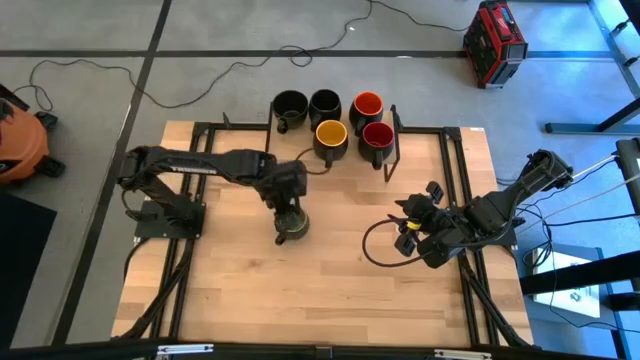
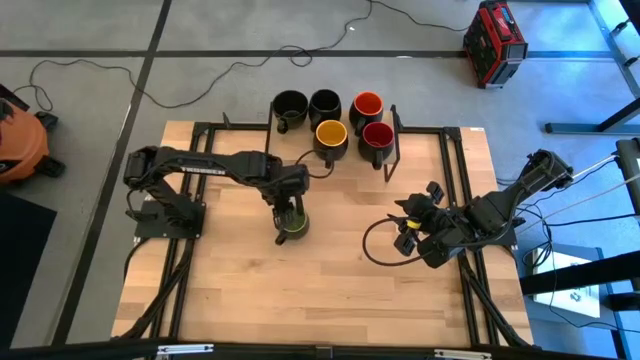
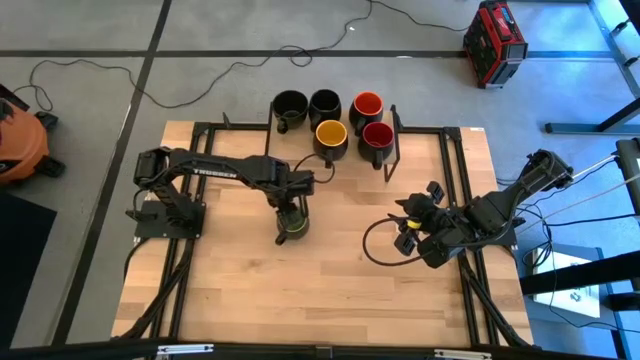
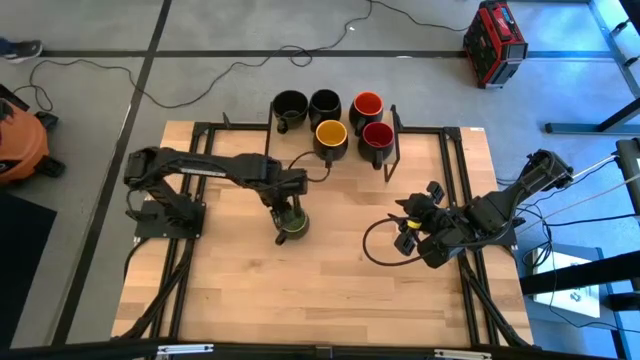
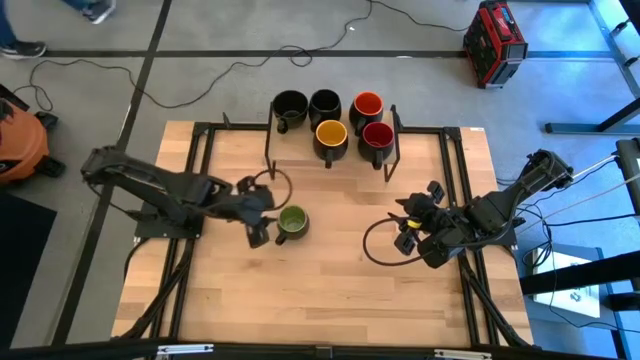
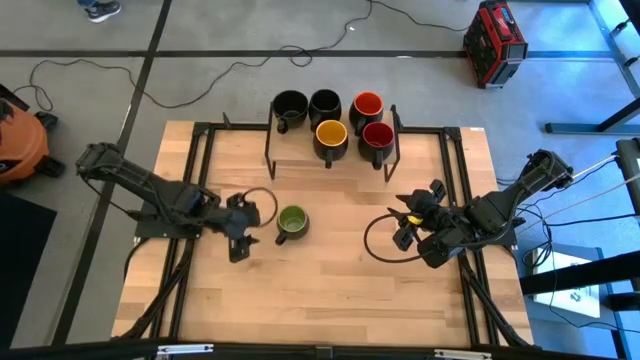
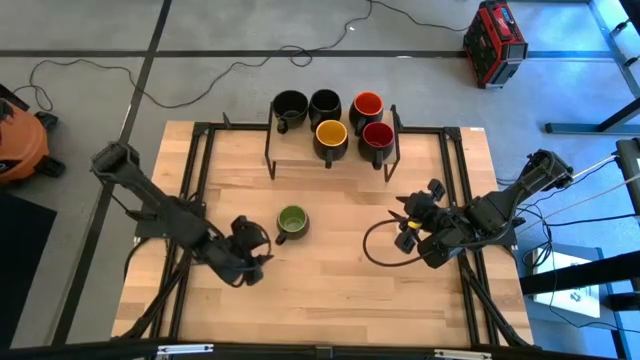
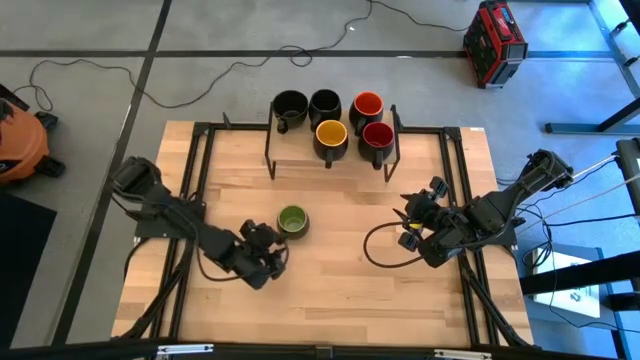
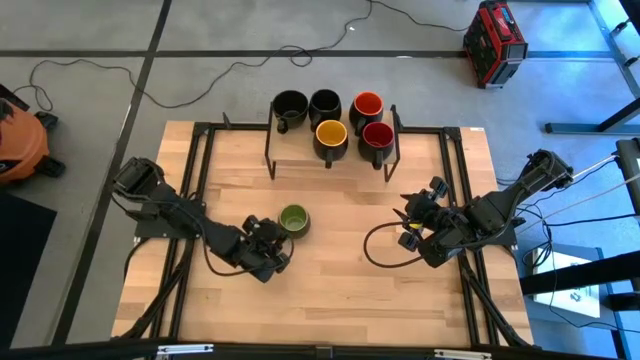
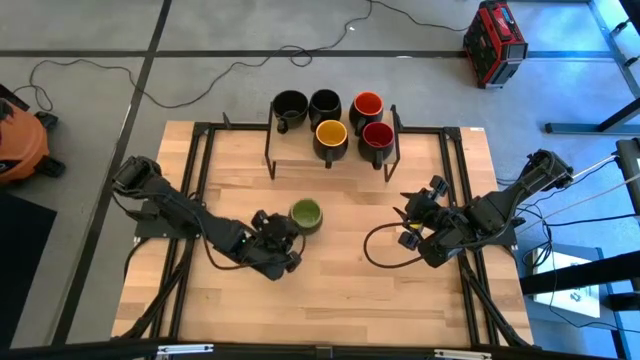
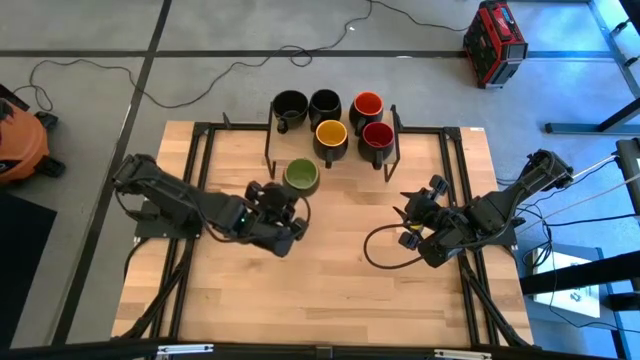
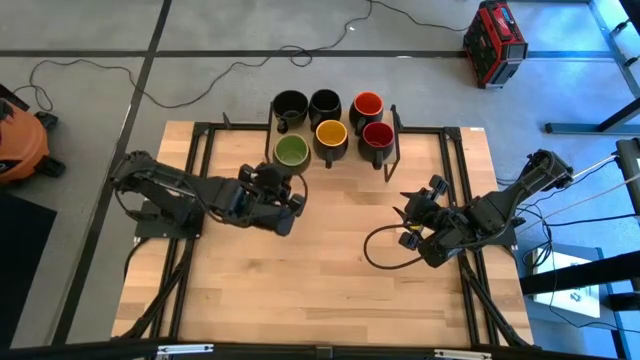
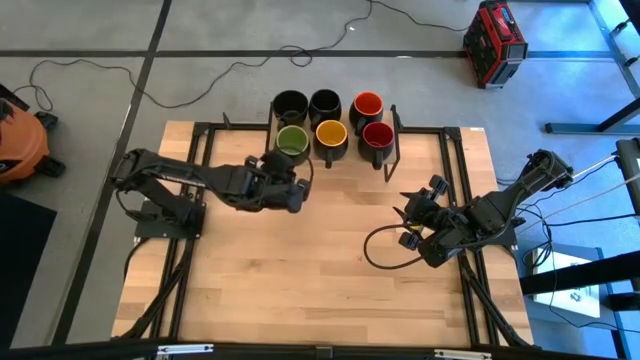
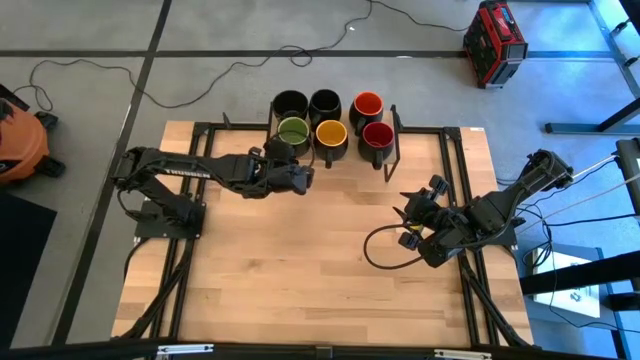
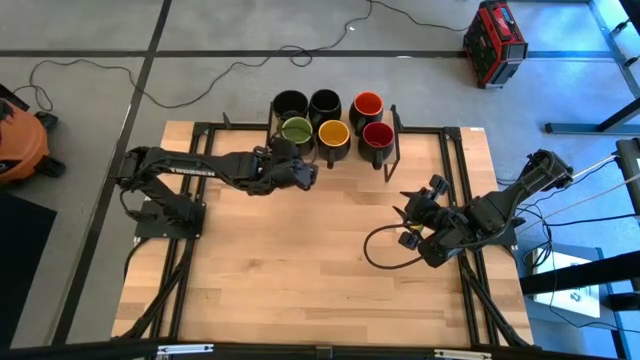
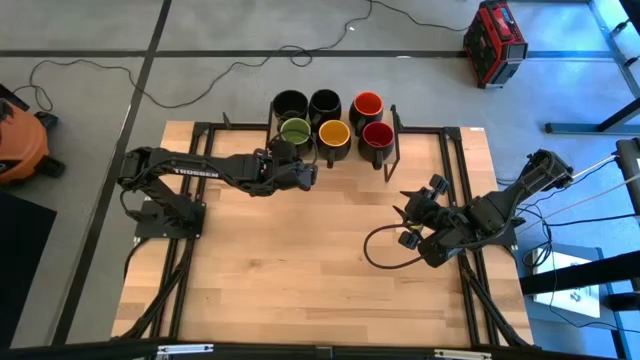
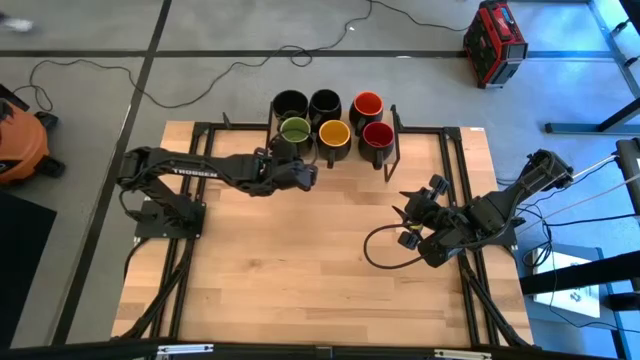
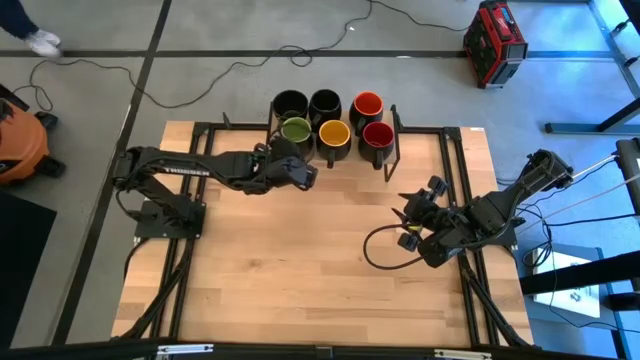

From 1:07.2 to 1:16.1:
Task: Place coffee mugs
Put the top green mug on the shelf

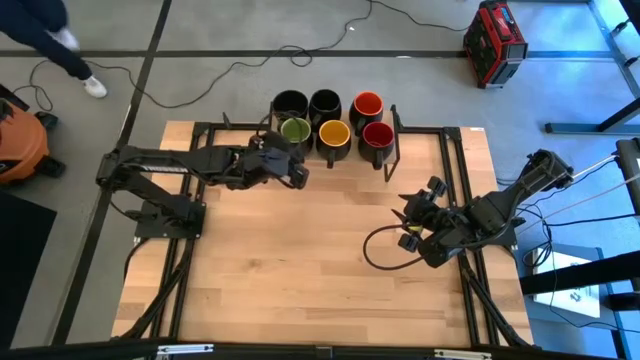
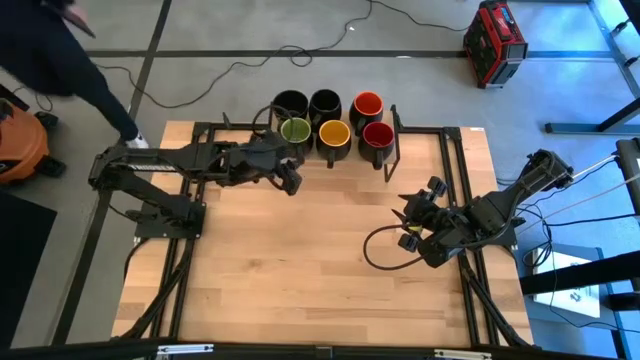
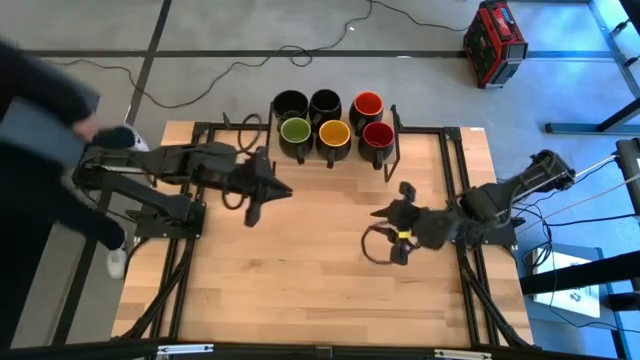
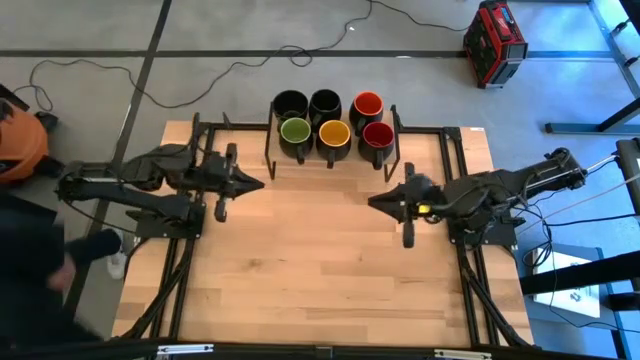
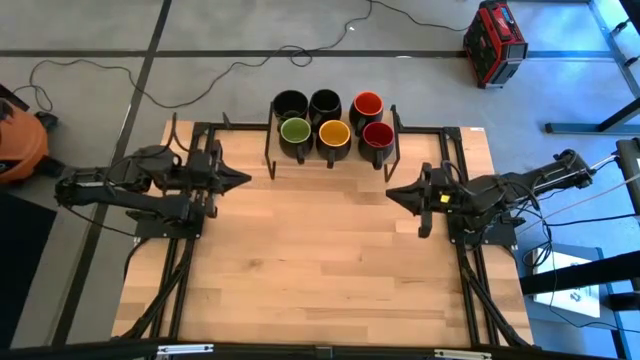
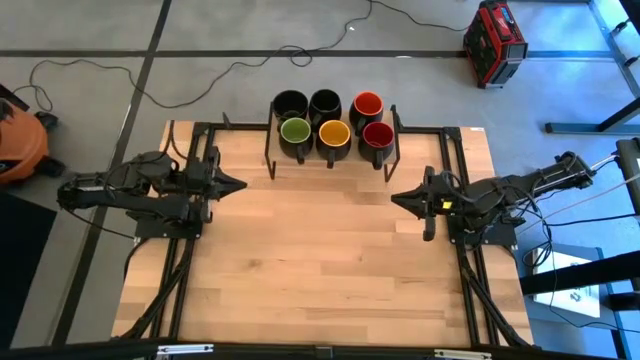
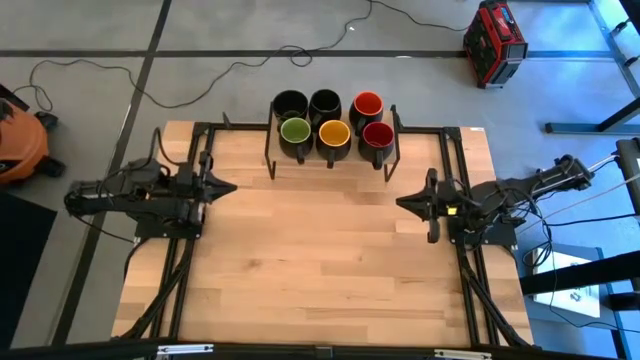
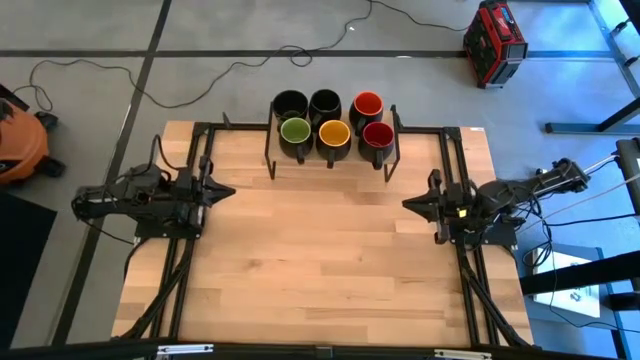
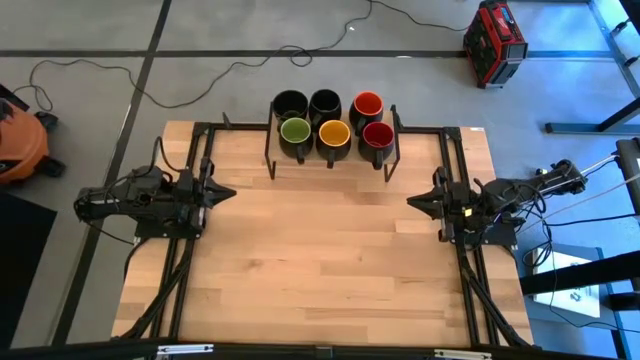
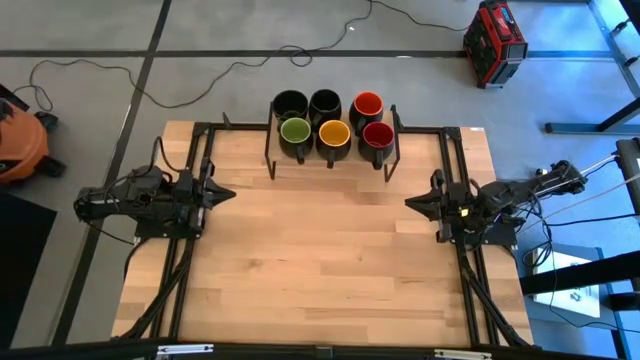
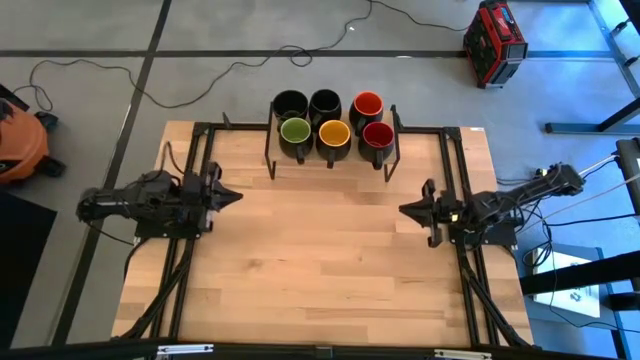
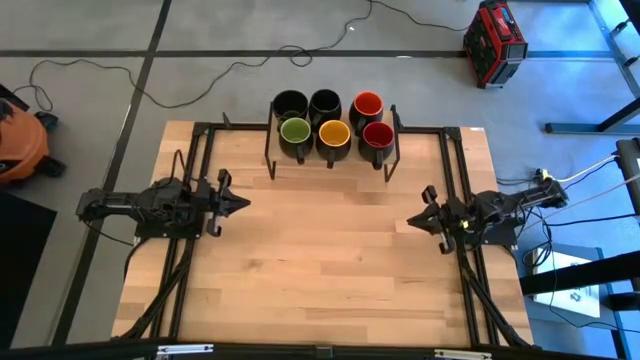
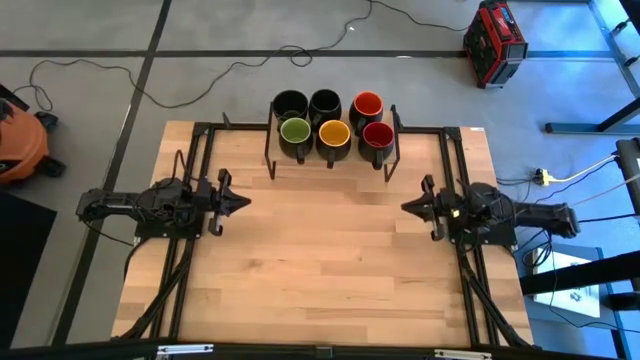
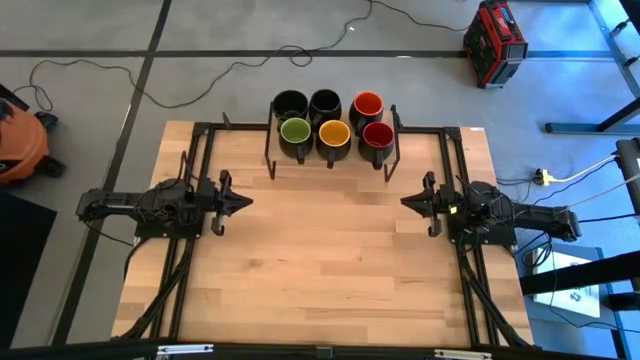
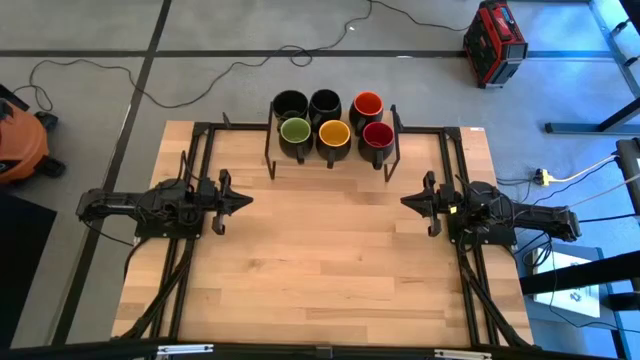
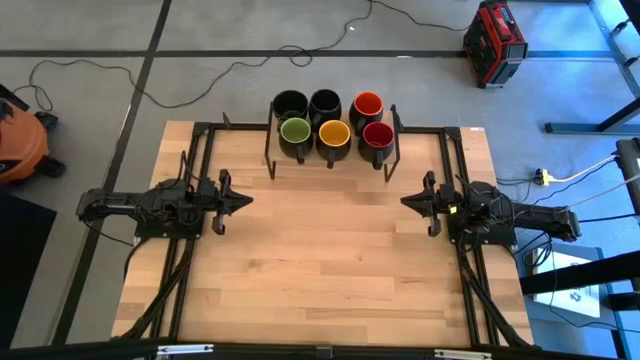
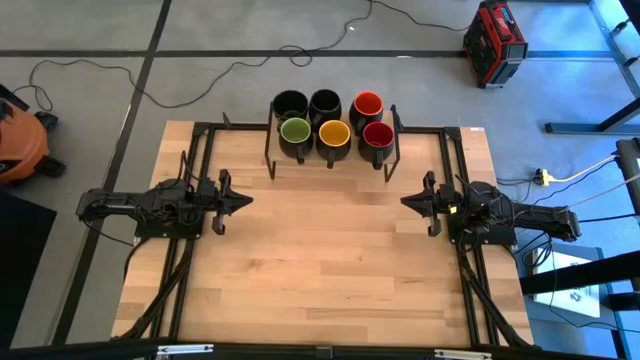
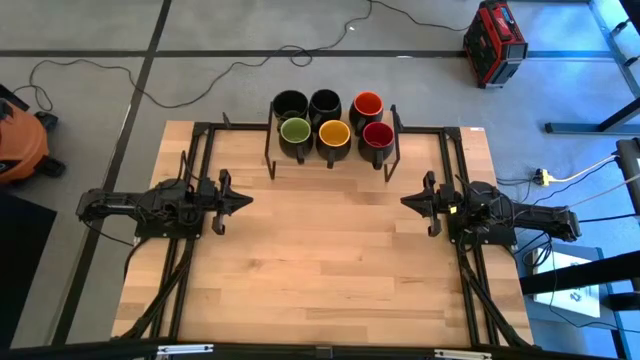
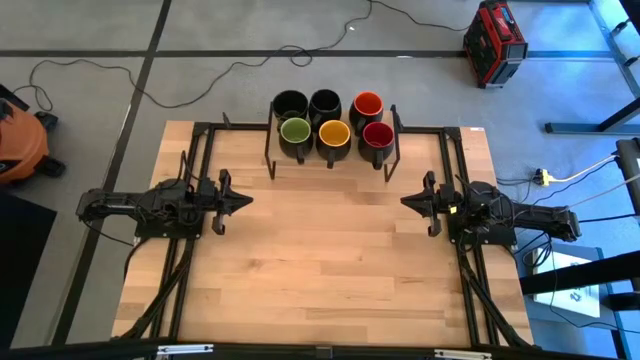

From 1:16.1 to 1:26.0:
Return to Home Position

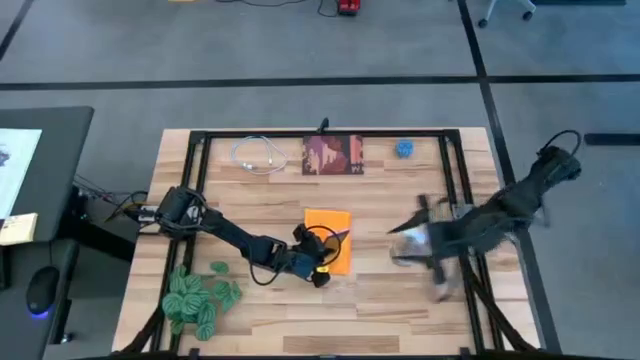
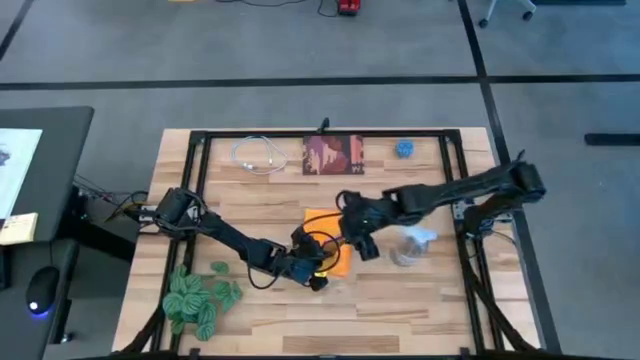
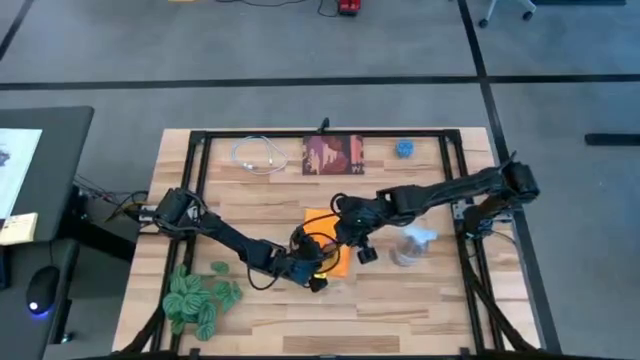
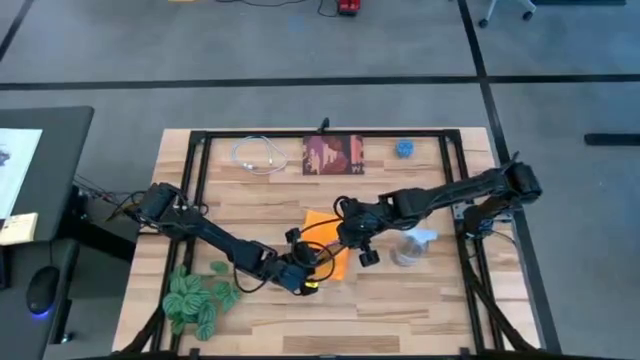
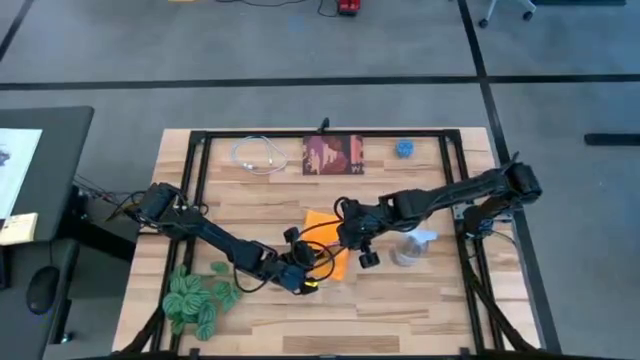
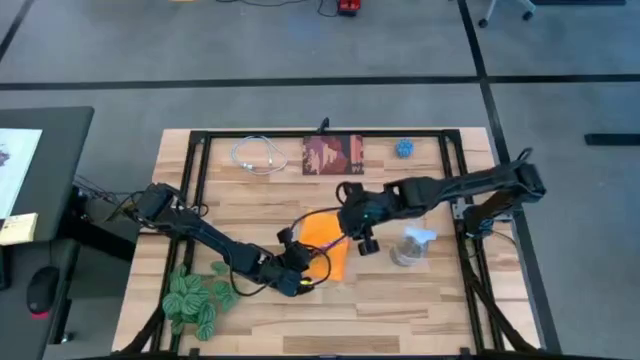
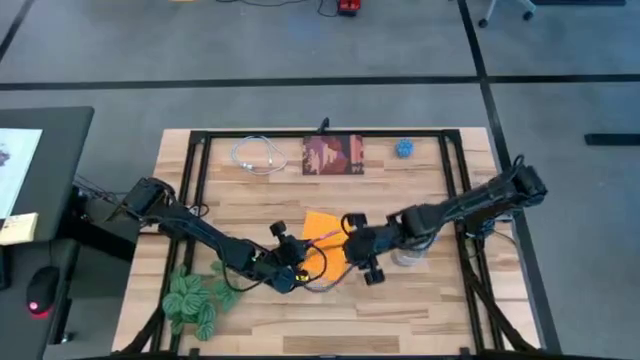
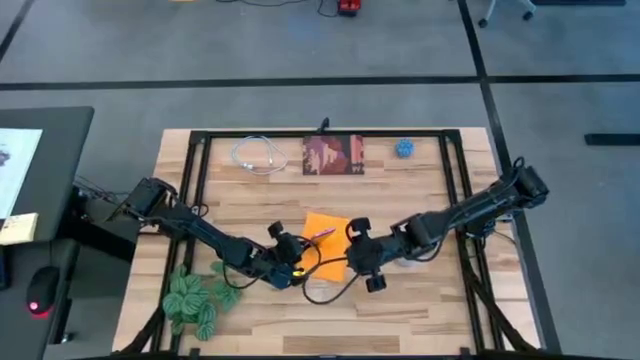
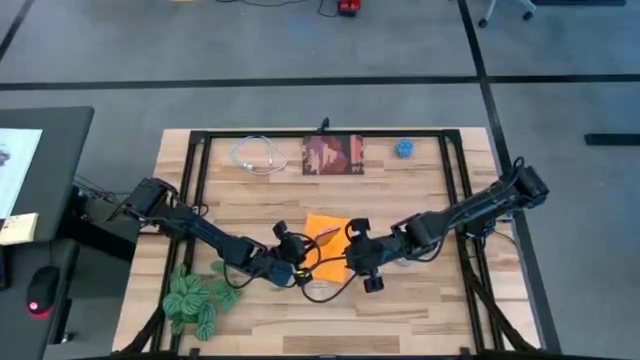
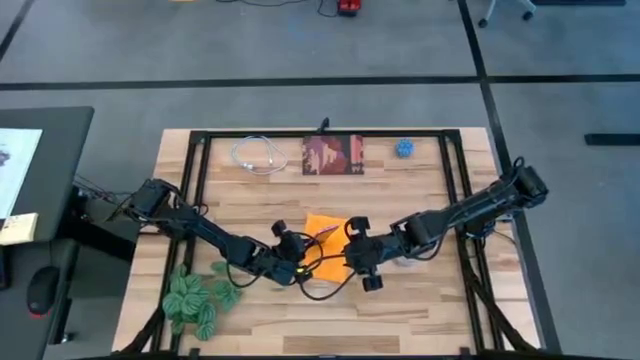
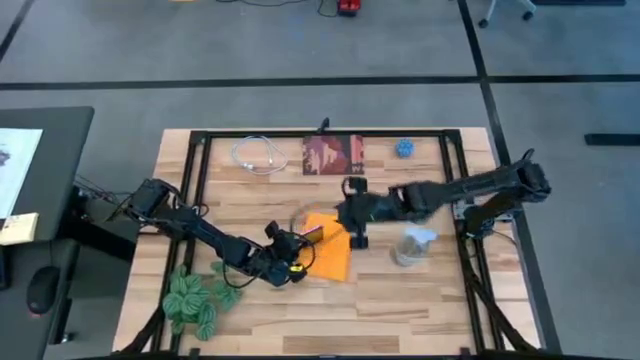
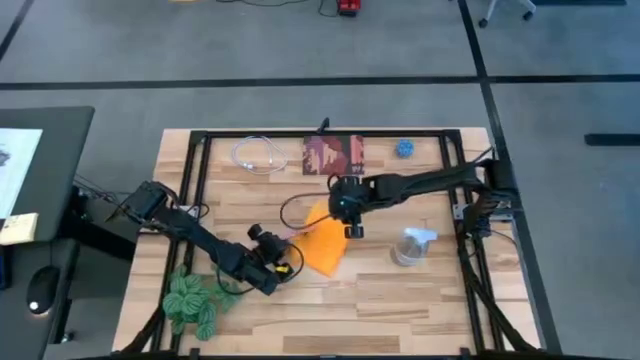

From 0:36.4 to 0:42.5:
Task: Apply microfiber cloth
Wipe the front of the pink cellphone using microfiber cloth
